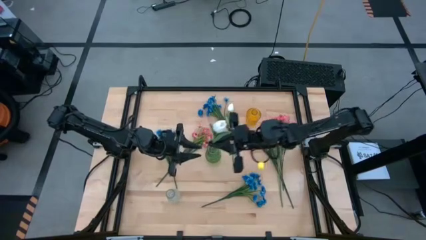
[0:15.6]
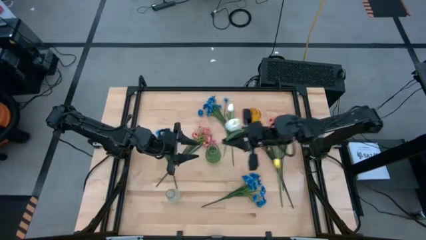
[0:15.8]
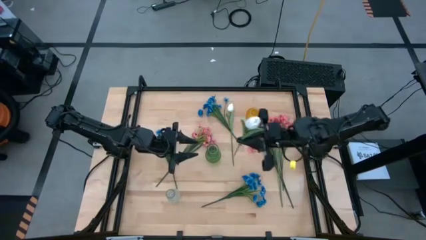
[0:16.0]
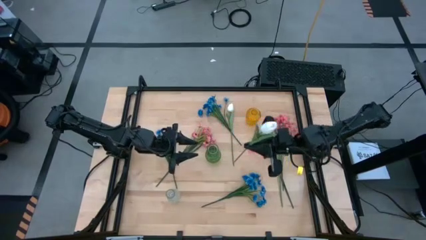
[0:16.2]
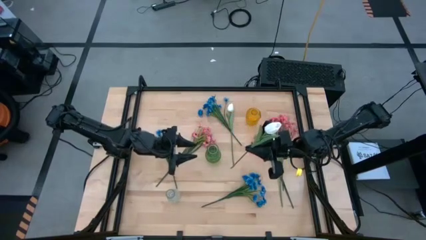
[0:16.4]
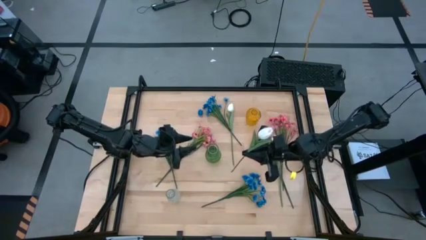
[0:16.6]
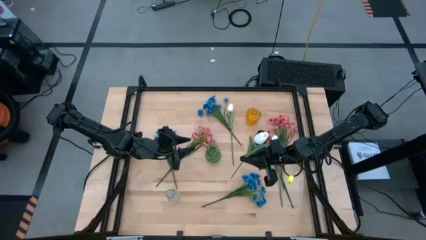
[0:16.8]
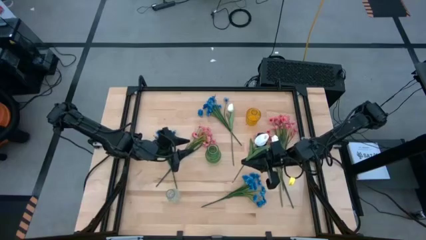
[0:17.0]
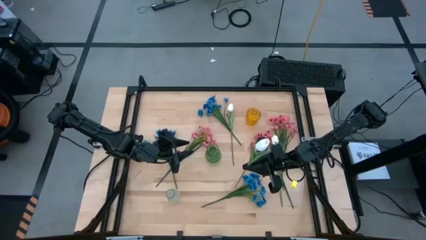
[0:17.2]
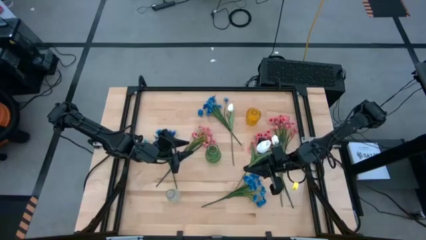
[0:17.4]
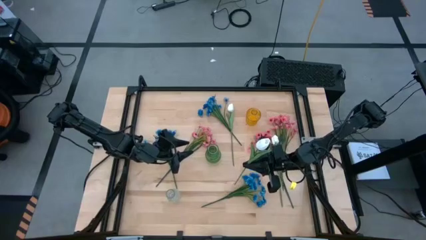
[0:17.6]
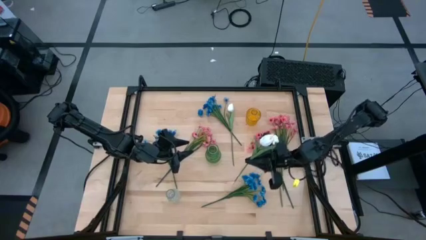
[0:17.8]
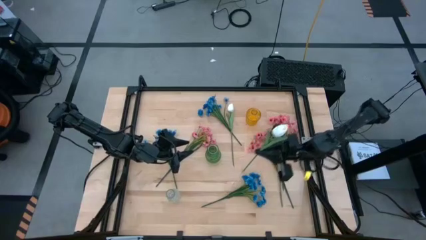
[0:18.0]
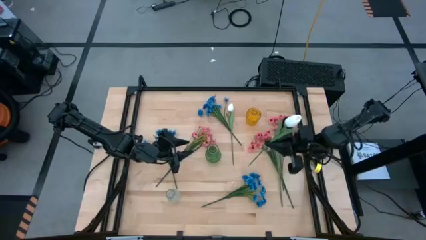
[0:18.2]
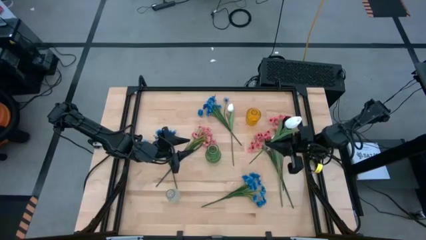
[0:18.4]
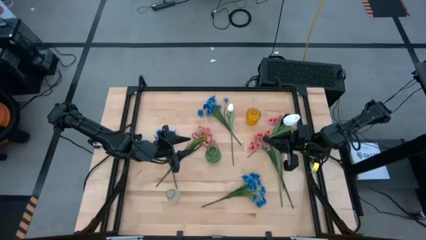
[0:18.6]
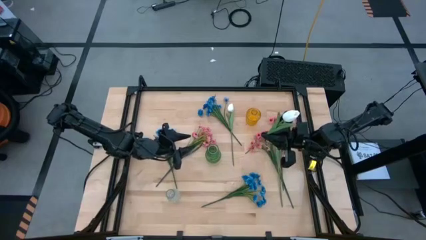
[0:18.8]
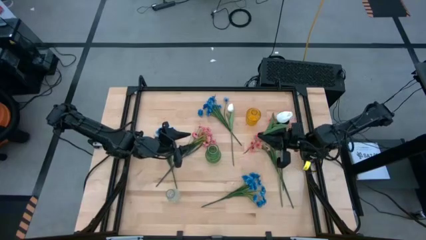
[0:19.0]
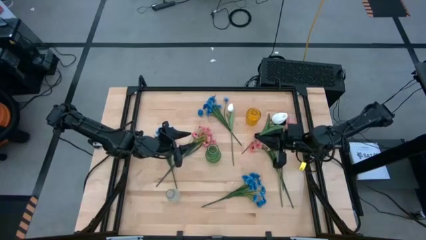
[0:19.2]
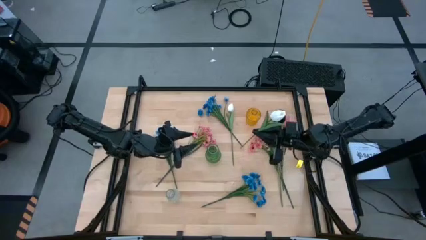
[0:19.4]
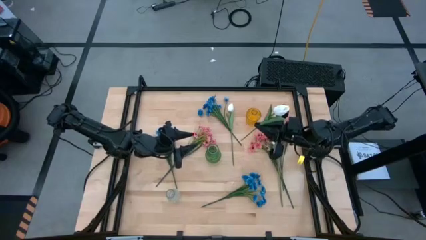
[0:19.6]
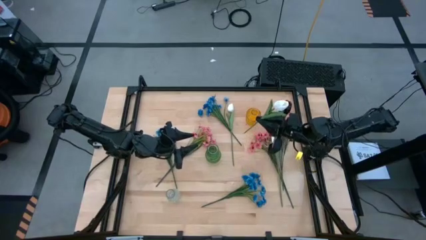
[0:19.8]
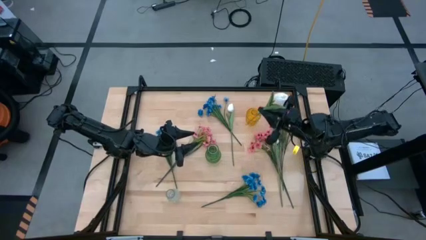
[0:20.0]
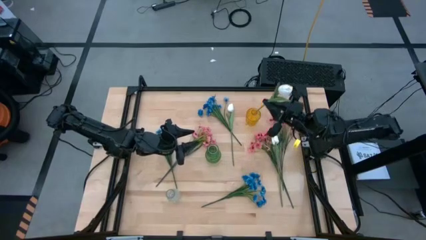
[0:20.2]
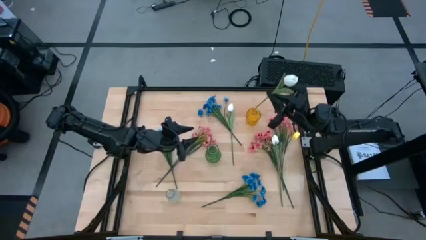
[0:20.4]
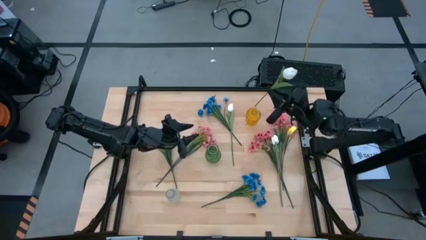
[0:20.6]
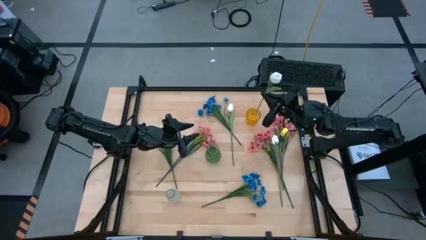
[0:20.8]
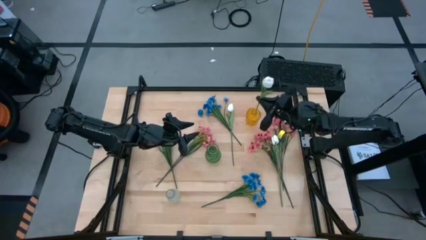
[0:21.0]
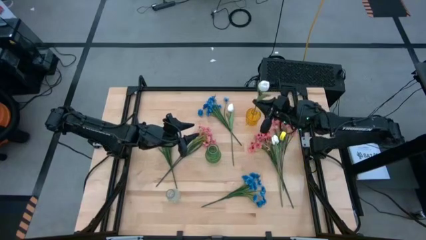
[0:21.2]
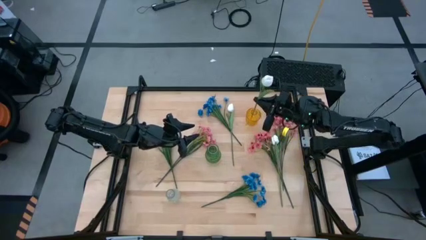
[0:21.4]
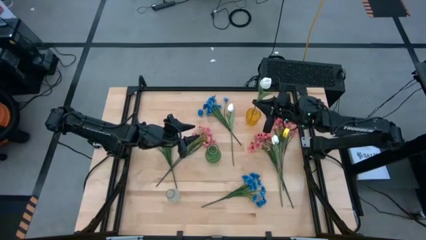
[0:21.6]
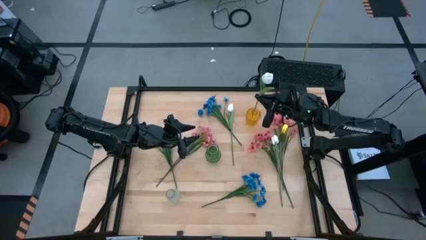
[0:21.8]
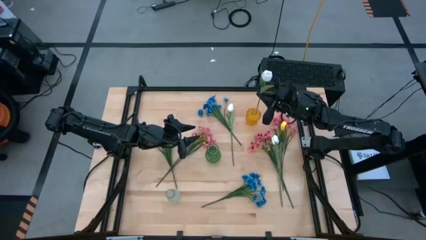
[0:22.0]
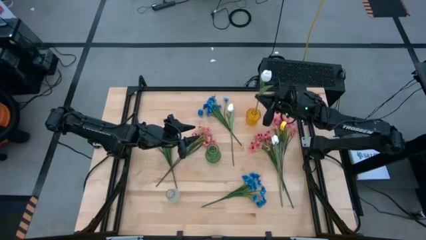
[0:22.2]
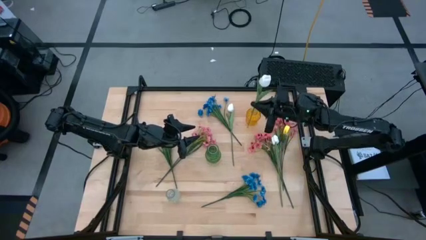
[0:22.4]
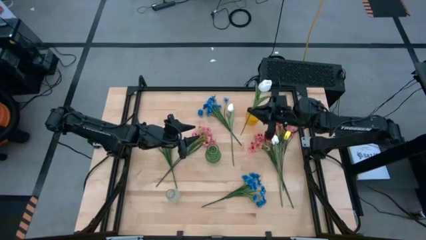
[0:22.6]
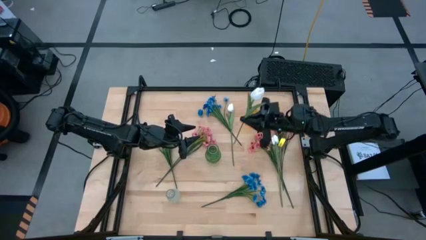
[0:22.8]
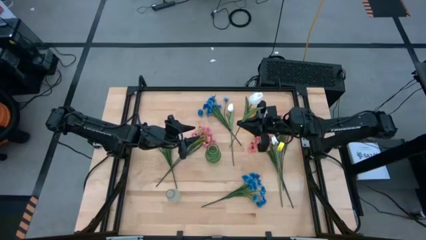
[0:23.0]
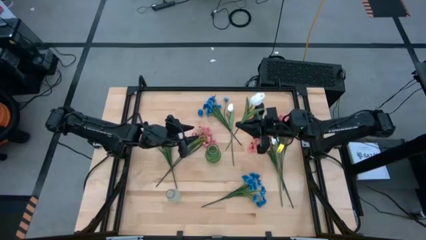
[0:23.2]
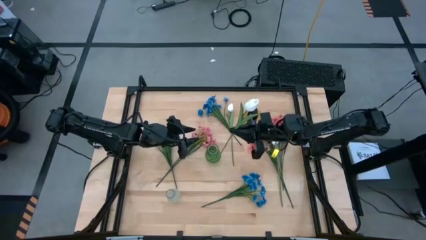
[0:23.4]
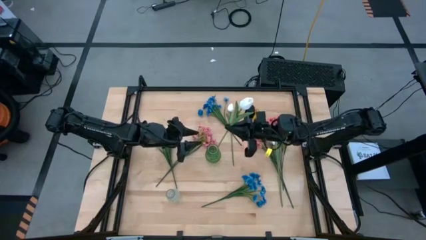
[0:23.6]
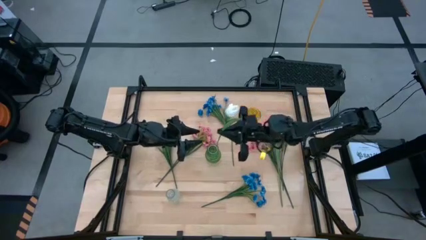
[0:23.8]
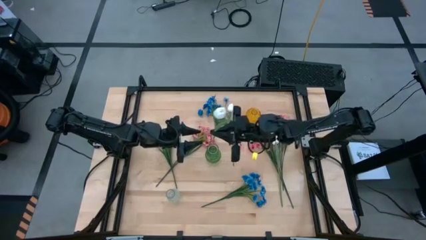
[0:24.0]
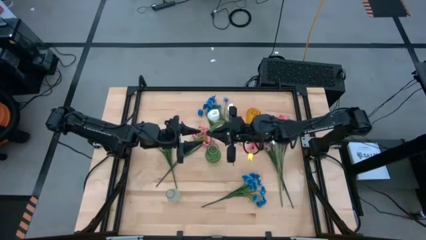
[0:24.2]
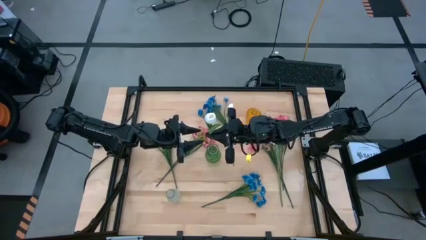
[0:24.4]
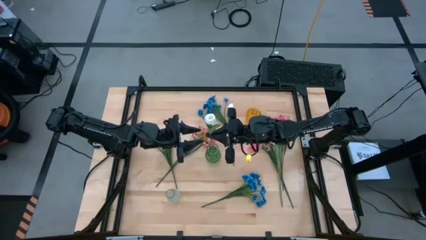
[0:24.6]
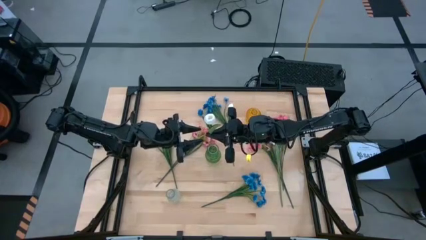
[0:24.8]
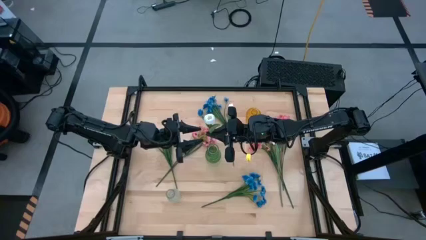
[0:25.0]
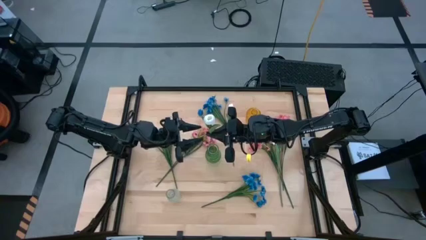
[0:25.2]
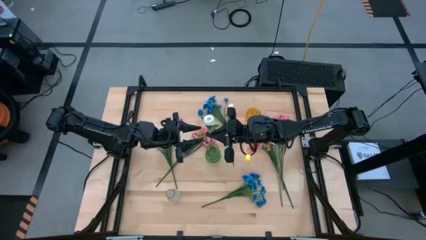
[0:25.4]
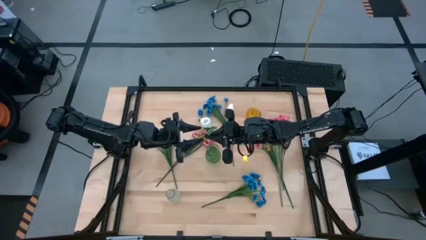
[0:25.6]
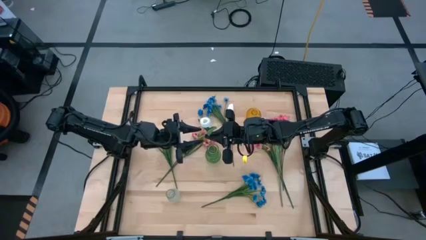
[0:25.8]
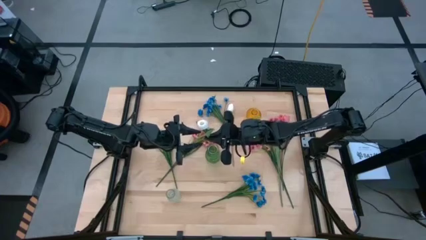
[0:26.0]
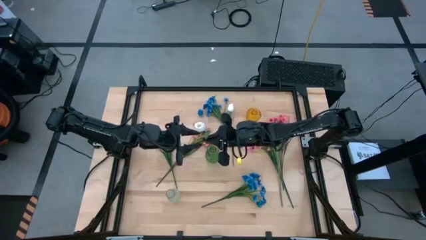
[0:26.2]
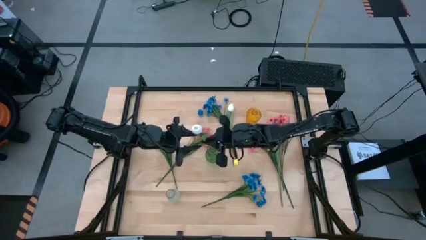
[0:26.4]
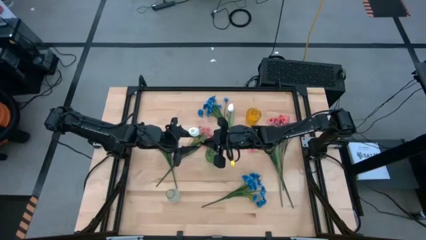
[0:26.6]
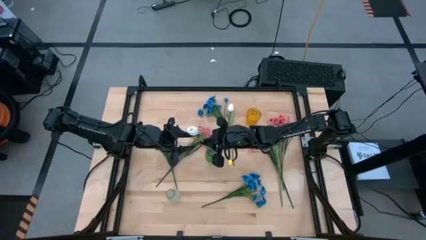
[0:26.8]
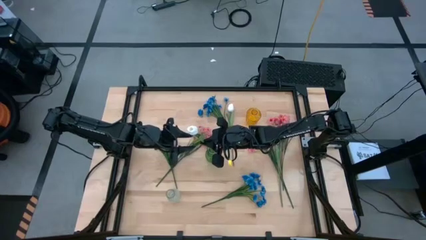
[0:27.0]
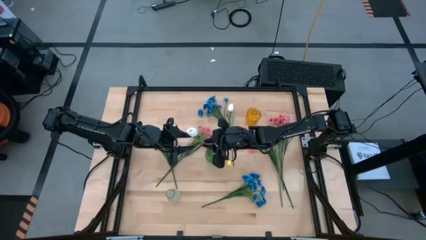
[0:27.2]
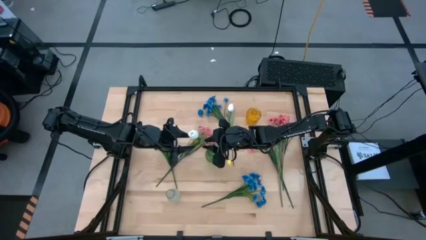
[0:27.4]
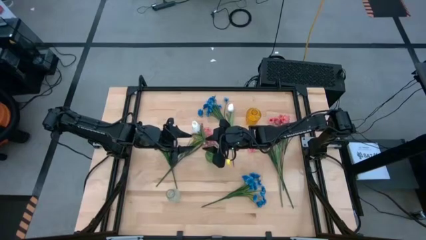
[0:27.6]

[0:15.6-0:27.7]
Task: Sort flowers into vase by color
Put the left white flower into the green vase
